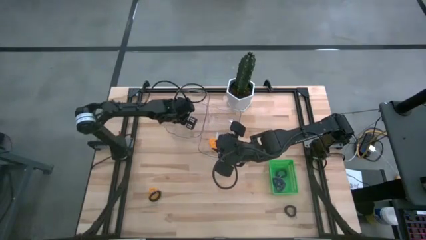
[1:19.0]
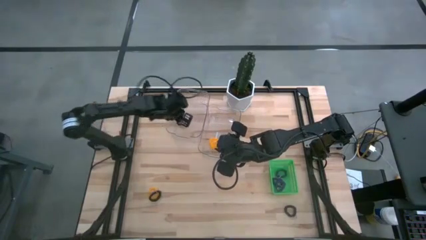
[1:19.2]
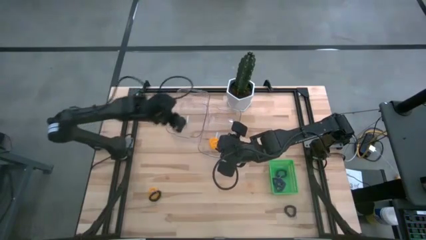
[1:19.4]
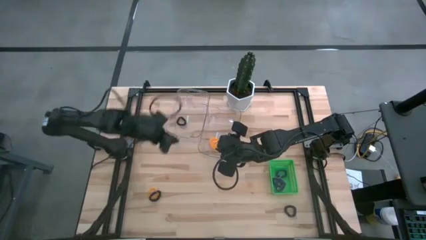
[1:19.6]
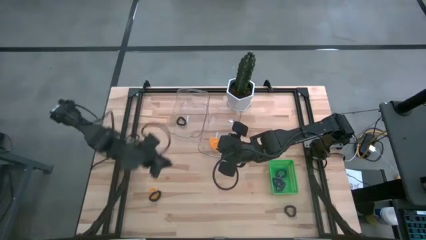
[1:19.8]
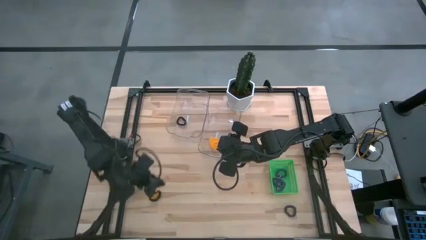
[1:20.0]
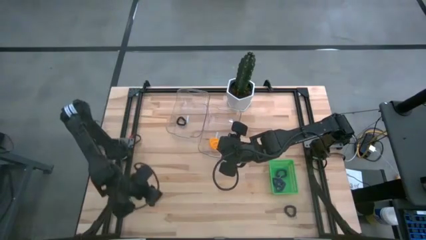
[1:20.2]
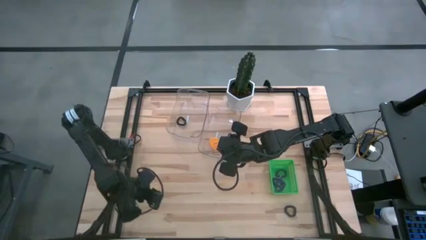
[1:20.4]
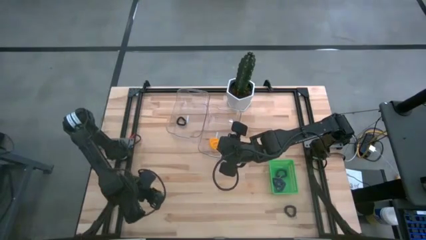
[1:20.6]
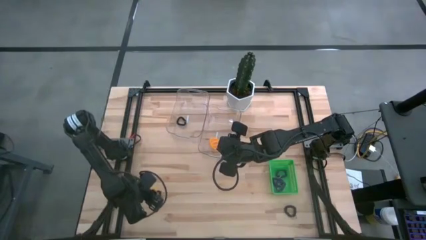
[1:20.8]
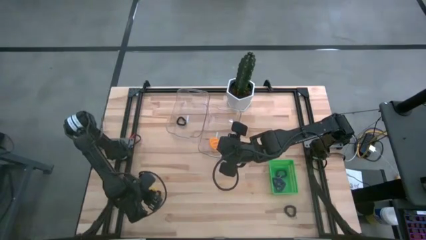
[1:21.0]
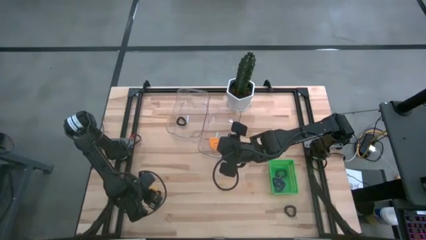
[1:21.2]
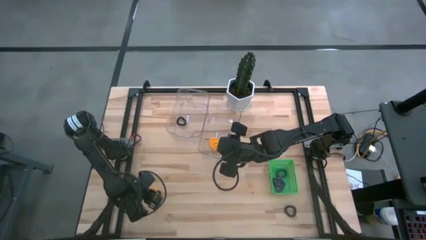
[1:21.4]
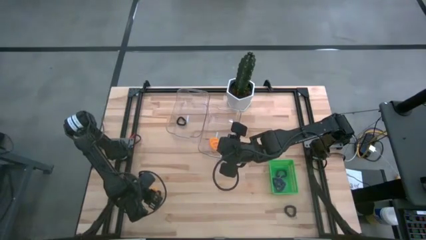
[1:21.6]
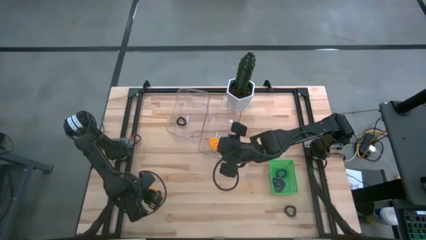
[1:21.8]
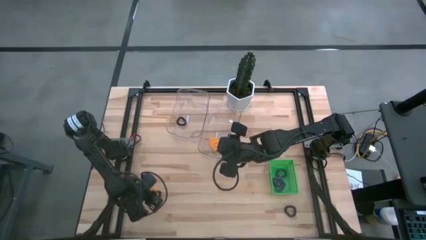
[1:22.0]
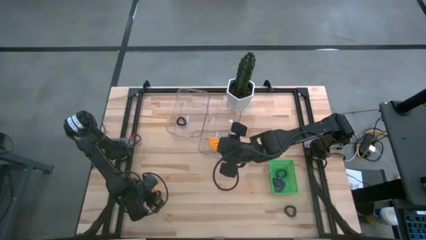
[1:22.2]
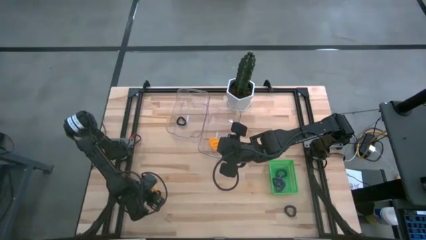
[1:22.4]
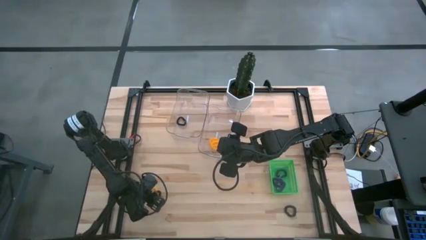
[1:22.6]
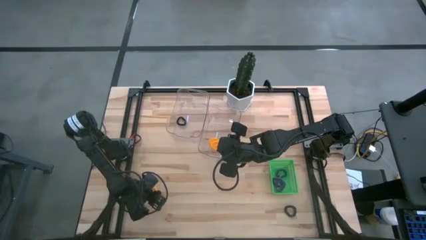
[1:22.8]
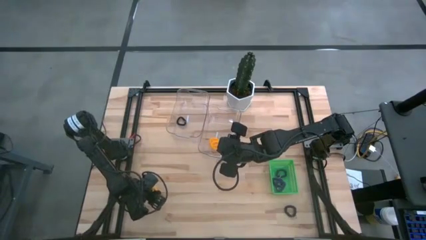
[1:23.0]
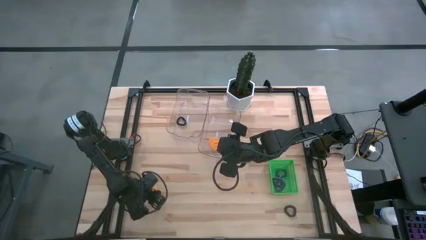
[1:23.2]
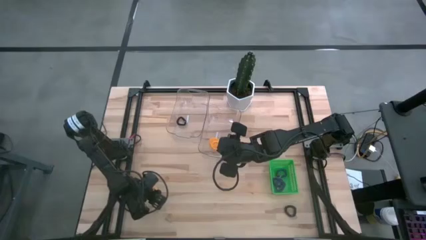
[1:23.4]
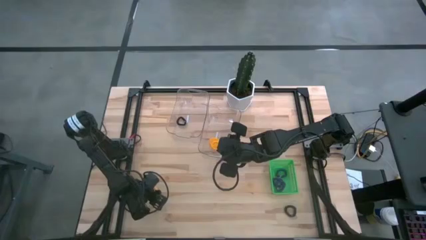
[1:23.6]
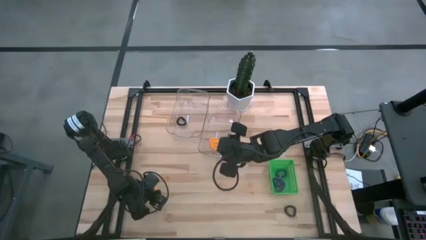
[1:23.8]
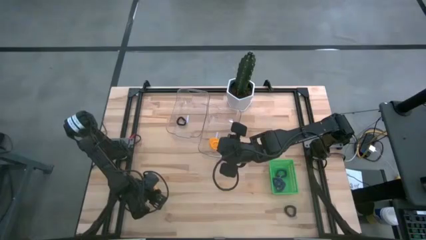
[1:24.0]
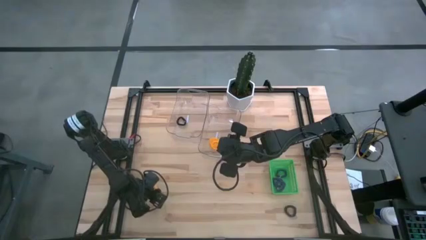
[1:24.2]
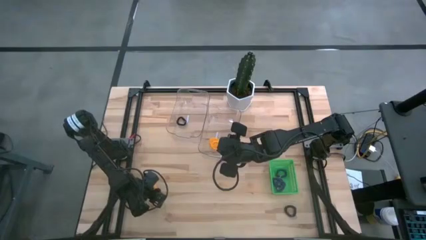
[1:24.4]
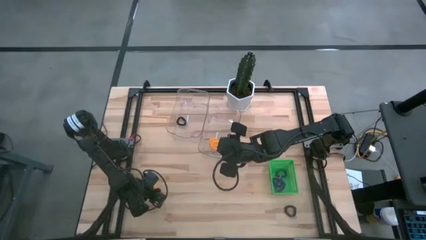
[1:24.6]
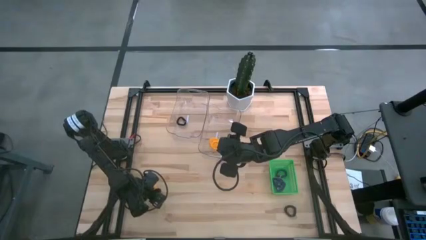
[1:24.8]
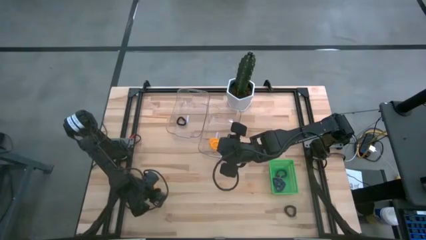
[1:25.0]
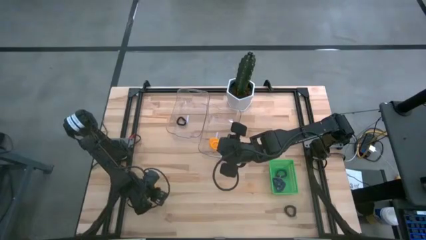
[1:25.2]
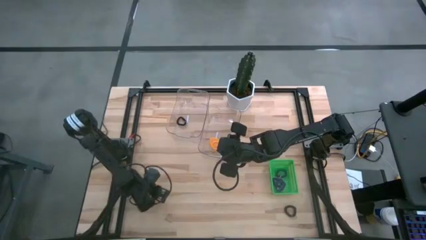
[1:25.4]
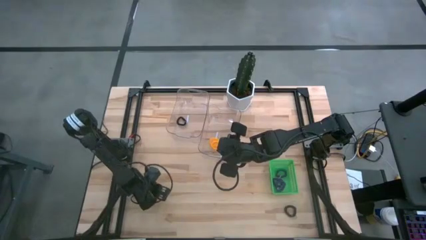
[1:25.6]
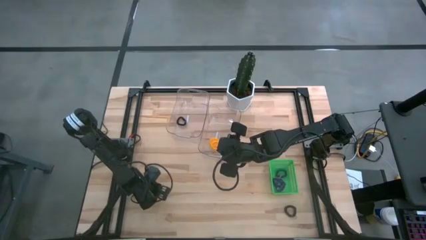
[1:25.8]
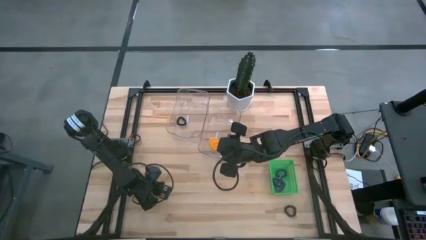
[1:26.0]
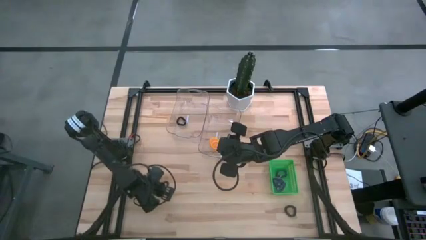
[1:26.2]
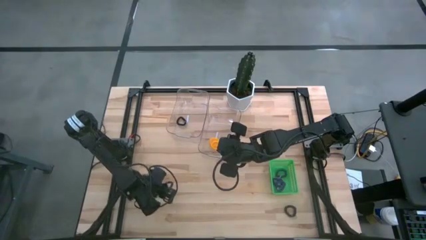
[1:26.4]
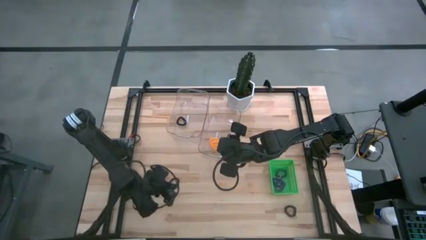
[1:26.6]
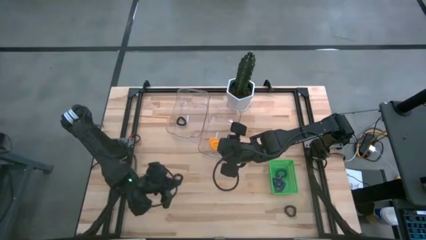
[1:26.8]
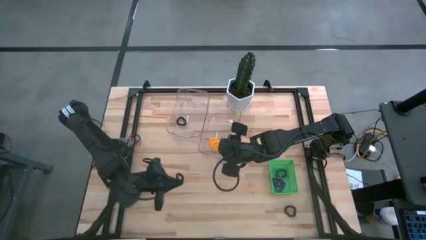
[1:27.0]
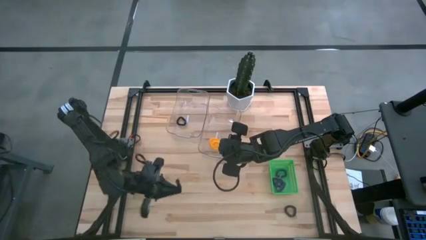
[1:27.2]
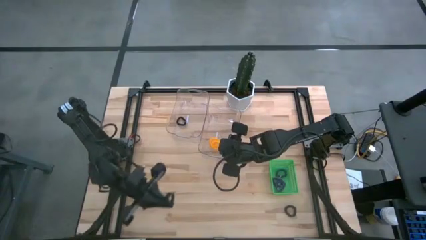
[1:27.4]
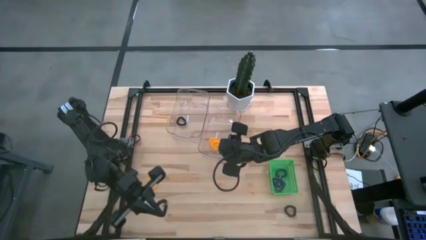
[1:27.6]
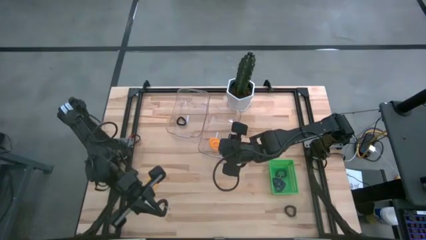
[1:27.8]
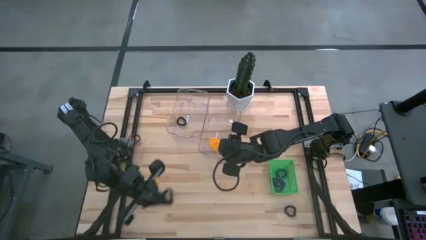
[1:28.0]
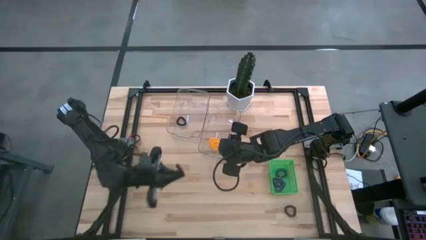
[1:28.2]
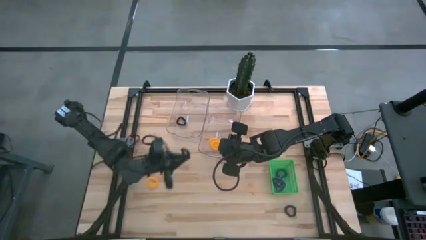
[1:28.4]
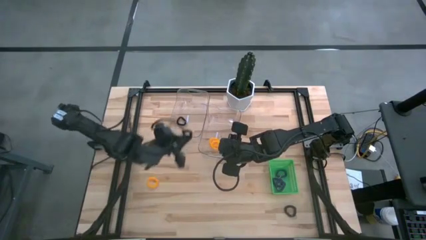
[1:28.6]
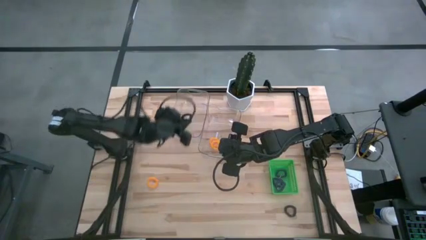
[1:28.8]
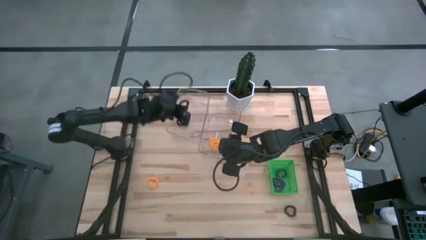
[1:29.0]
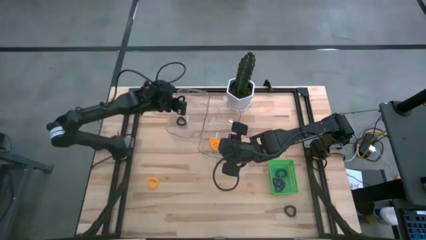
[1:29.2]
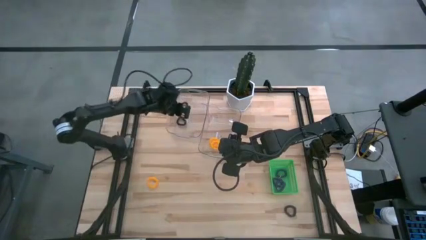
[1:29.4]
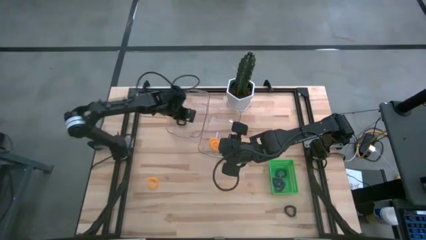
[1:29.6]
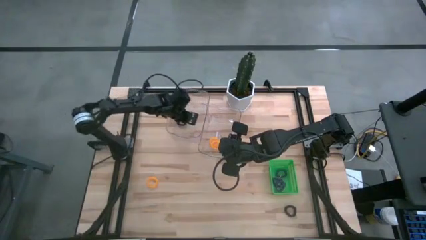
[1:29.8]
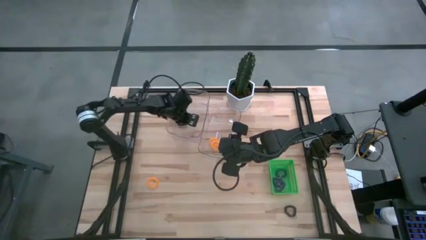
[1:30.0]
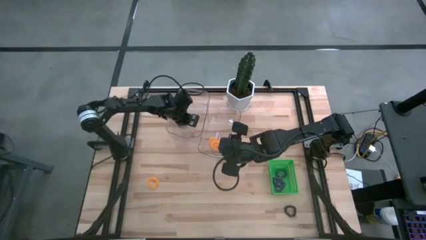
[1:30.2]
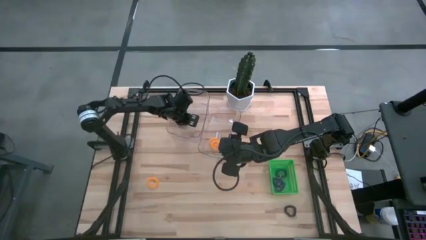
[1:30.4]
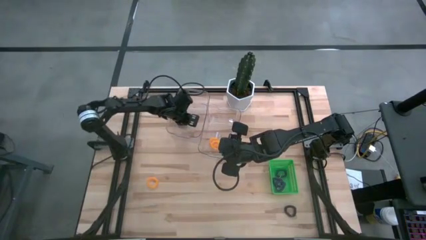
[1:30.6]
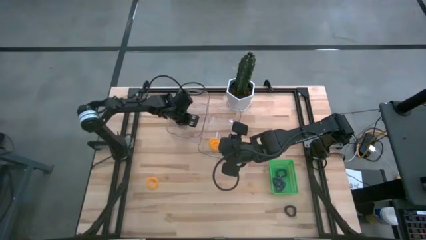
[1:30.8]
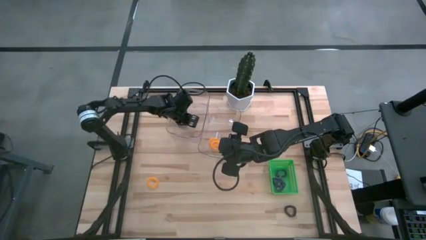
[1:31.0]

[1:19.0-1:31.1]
Task: Sort spring keychains
Put the left black spring keychain into the left transparent bin
